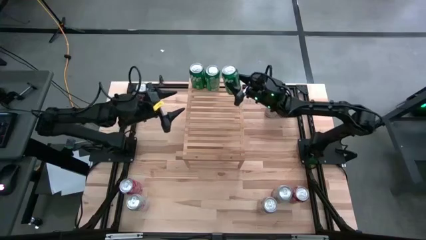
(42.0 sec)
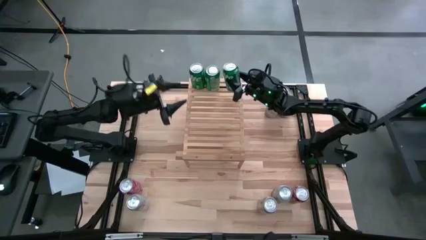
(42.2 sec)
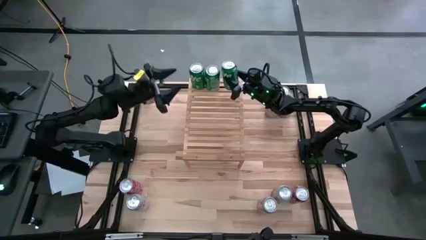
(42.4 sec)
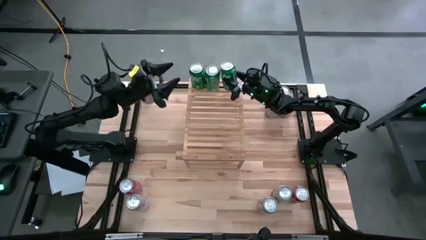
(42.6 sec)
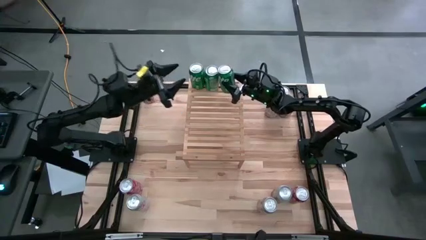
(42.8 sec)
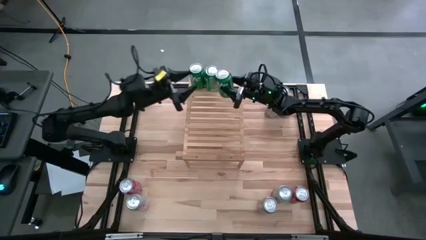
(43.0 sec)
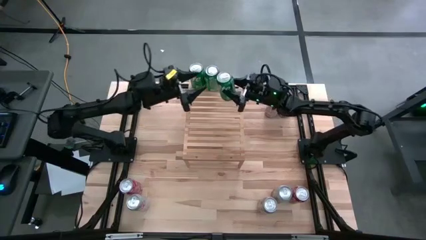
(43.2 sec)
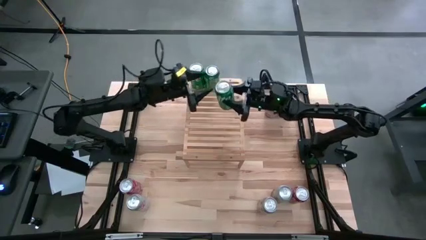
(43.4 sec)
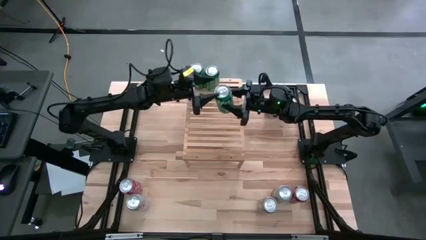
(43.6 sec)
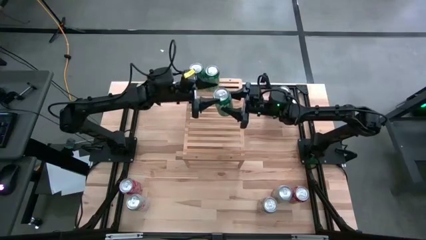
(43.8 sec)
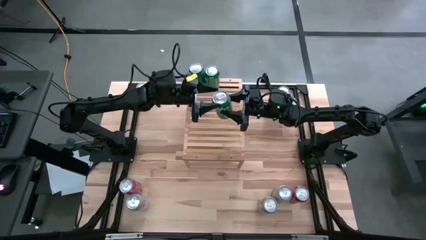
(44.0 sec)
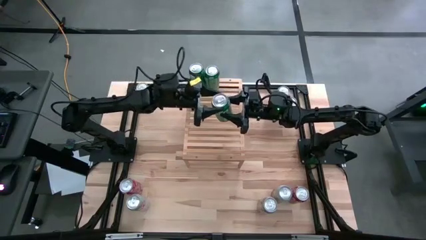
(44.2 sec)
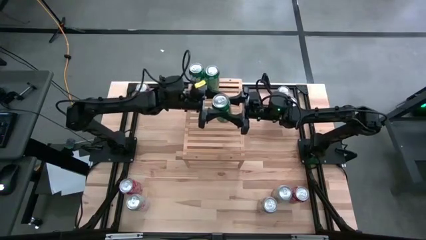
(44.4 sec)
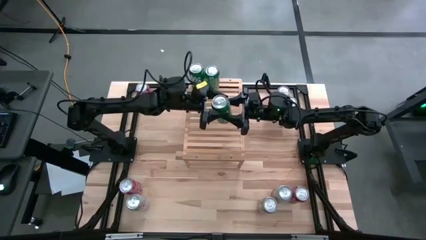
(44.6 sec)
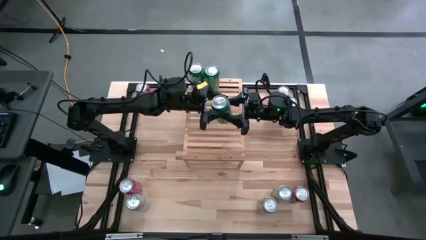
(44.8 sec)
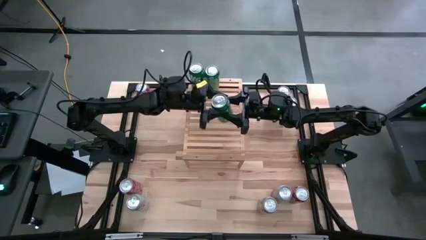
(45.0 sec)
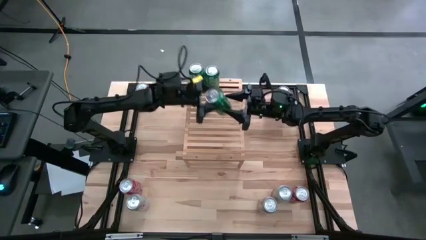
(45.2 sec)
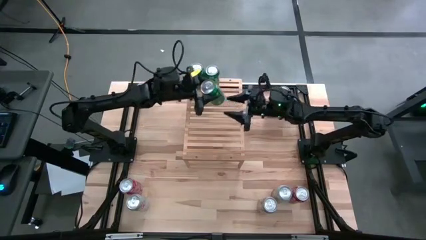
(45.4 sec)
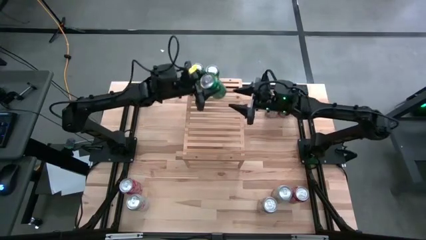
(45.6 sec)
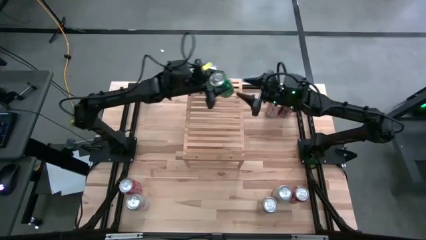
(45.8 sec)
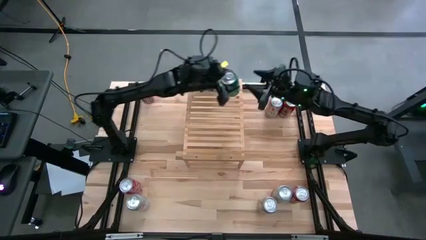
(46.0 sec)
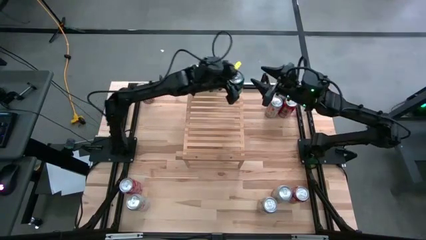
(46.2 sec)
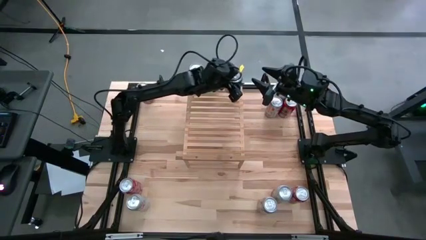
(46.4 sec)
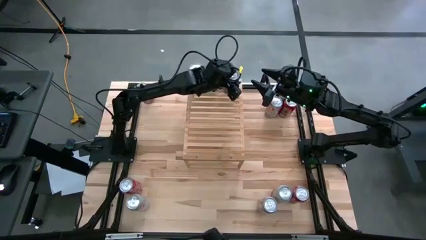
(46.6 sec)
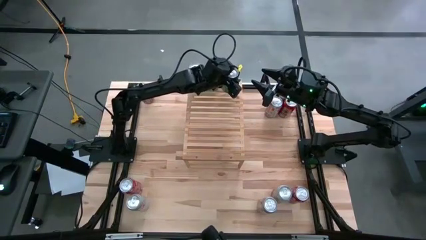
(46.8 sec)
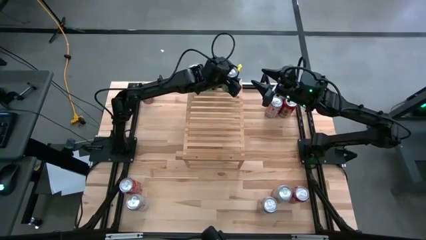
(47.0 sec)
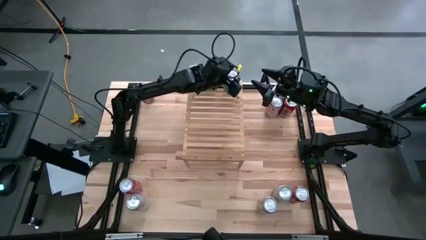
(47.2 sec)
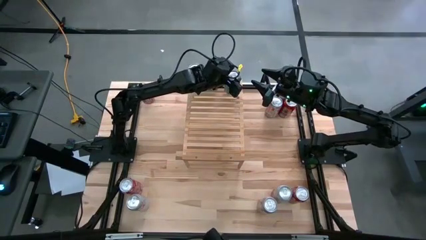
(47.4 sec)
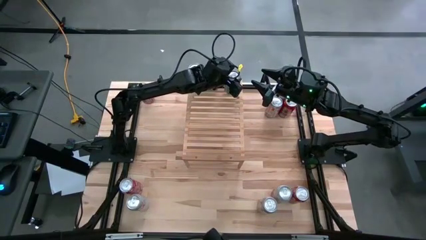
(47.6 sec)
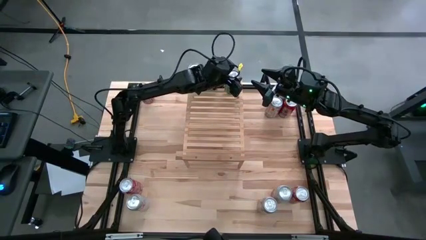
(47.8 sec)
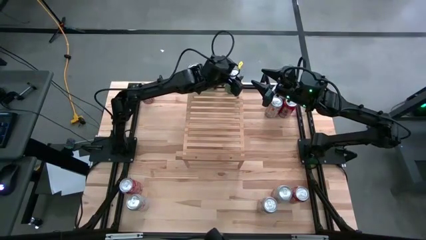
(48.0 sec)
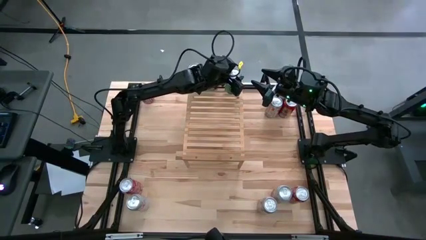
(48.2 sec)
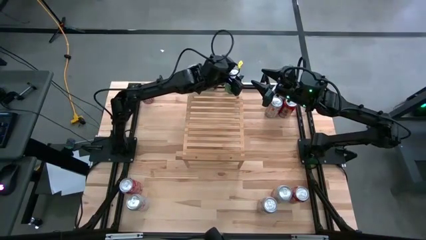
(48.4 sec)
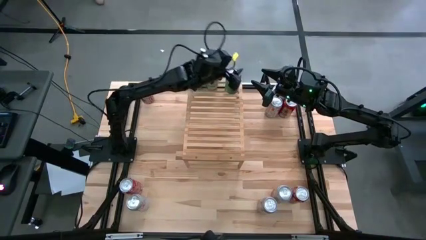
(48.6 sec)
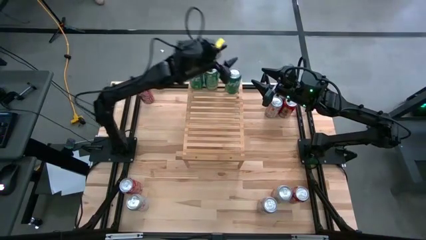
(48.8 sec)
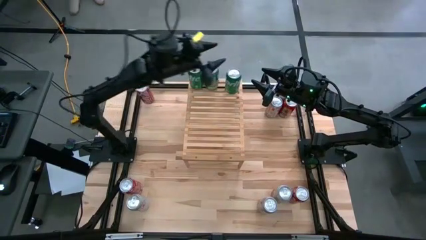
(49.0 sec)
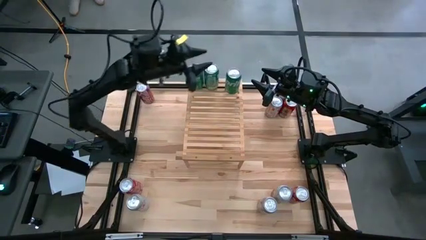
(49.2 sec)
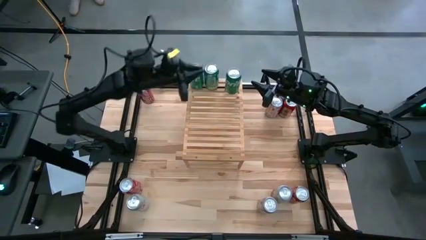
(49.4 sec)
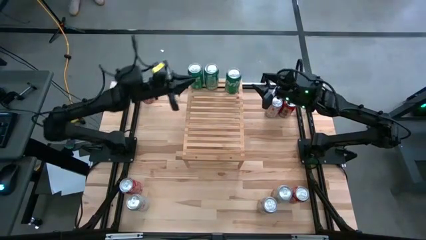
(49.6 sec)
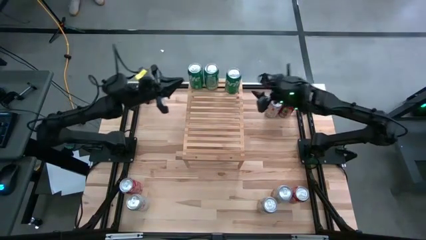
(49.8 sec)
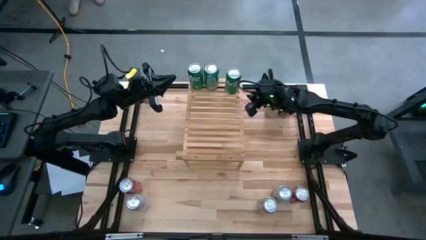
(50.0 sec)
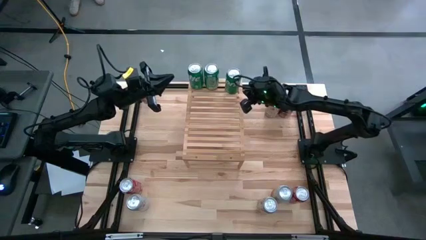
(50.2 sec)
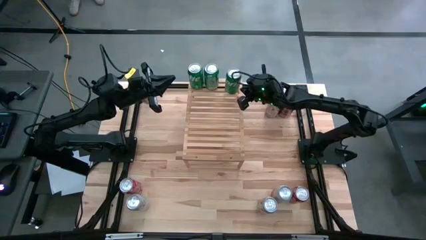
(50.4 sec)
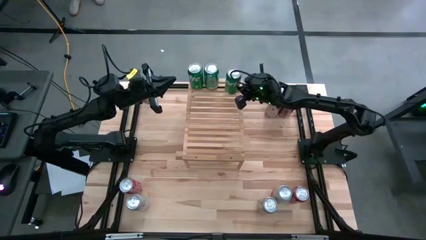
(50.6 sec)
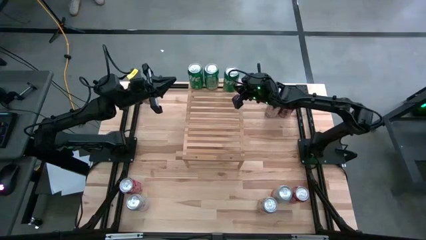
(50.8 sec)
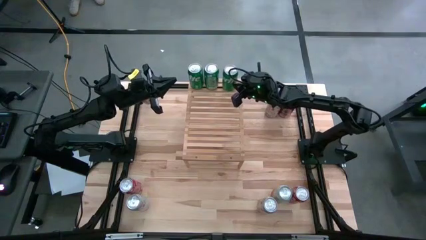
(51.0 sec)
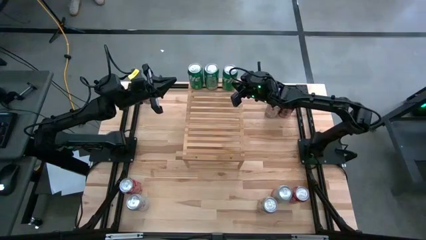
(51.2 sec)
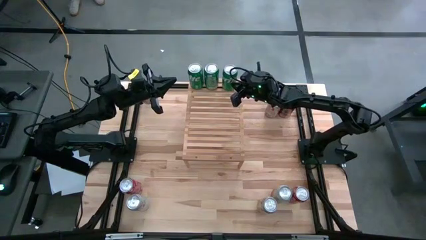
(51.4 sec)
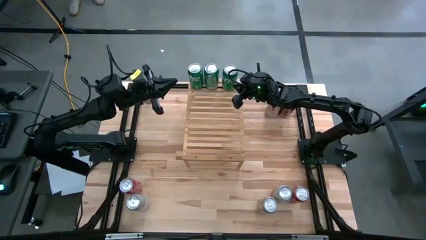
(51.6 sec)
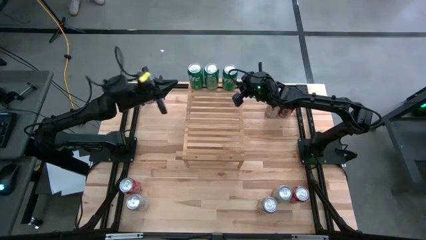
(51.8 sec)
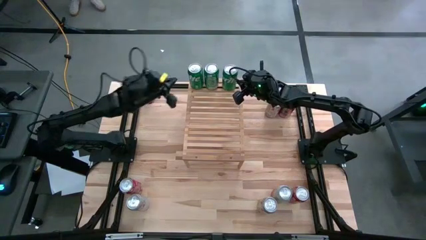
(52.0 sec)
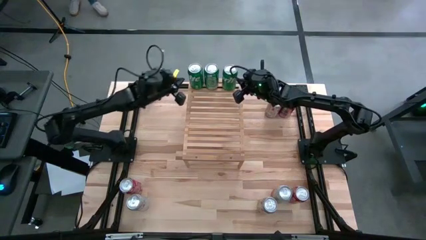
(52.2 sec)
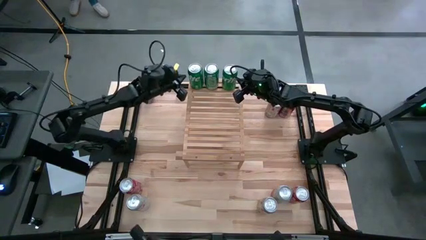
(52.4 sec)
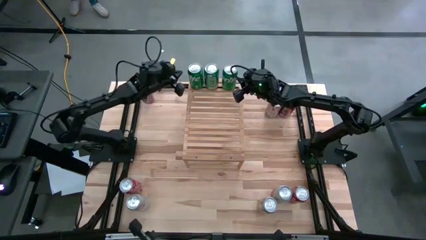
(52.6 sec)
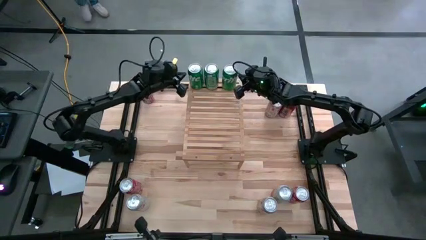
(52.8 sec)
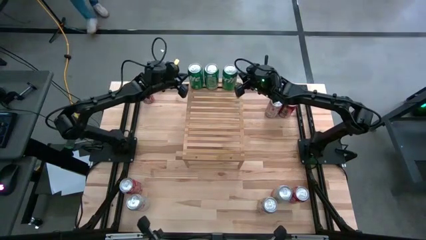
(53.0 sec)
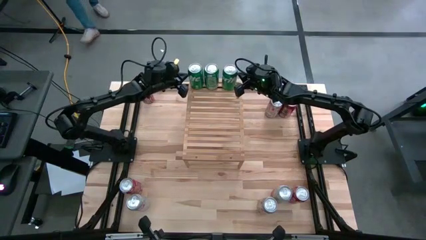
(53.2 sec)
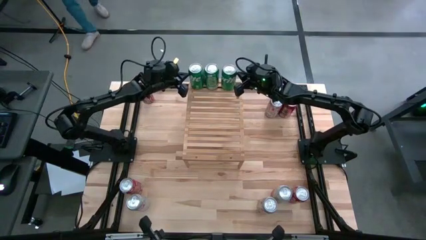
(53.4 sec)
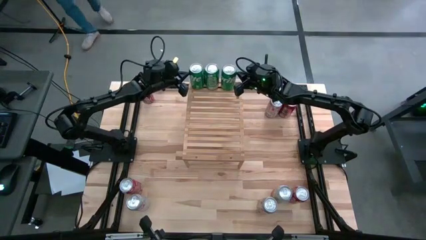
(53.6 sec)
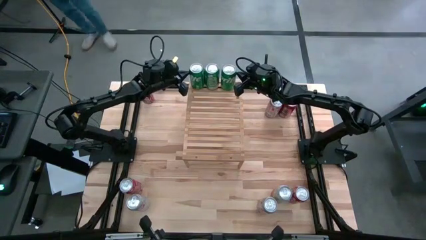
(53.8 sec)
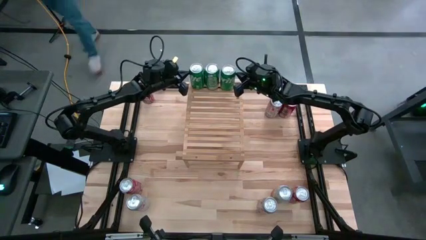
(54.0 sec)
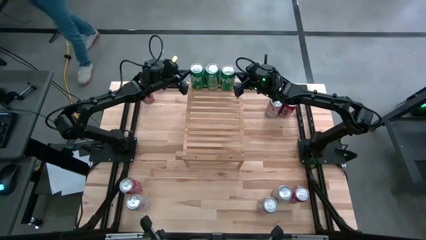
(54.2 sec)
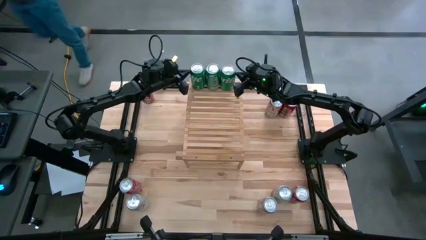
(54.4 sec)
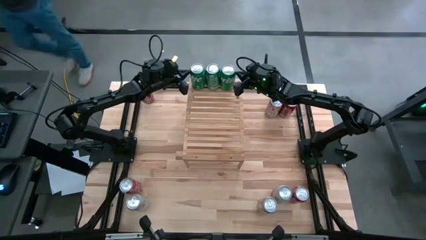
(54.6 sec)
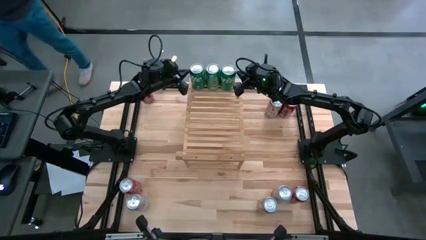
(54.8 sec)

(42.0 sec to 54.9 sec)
Task: Place canned beverage on shelf
Put the green soda can on the shelf aligned with the other green soda cans

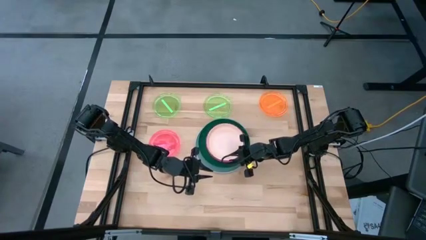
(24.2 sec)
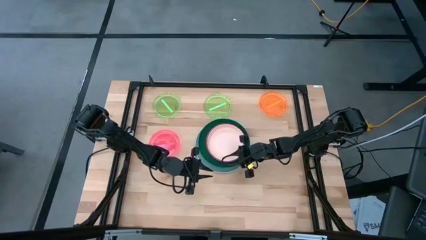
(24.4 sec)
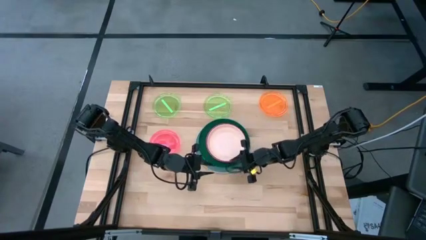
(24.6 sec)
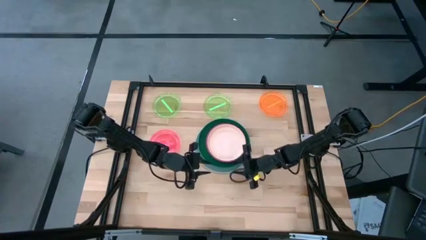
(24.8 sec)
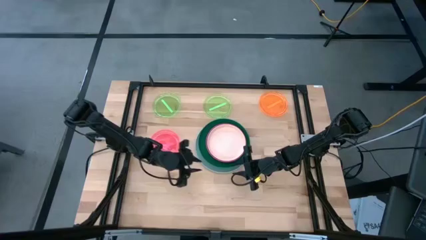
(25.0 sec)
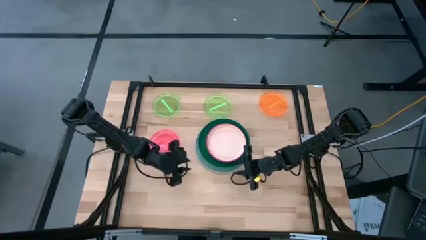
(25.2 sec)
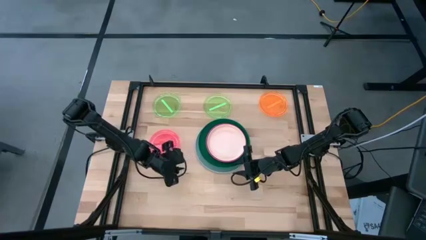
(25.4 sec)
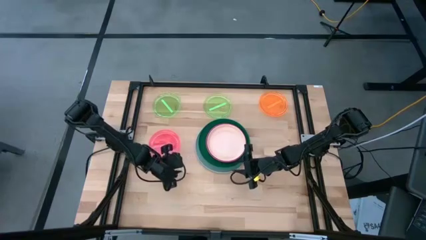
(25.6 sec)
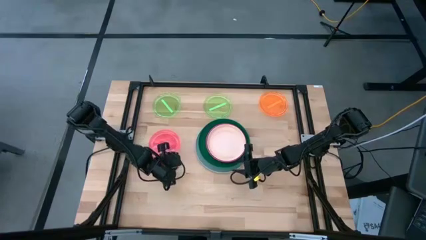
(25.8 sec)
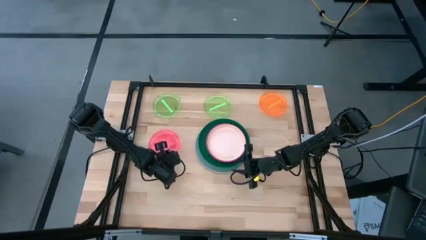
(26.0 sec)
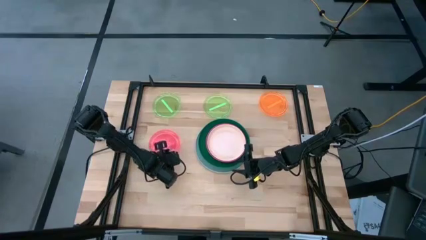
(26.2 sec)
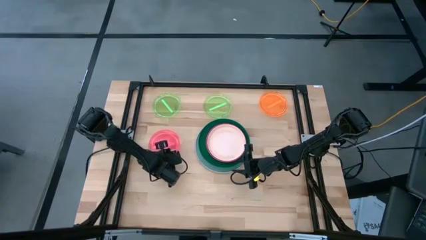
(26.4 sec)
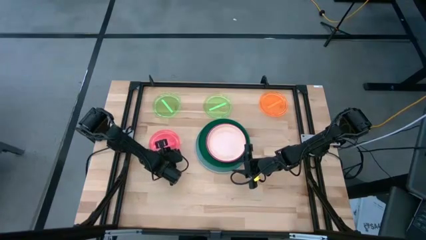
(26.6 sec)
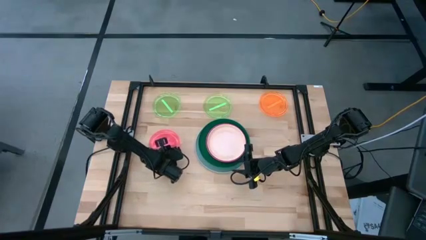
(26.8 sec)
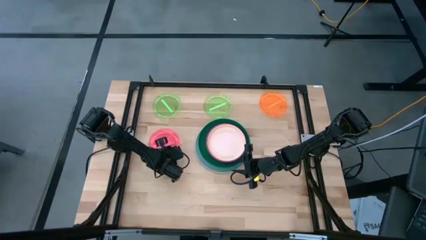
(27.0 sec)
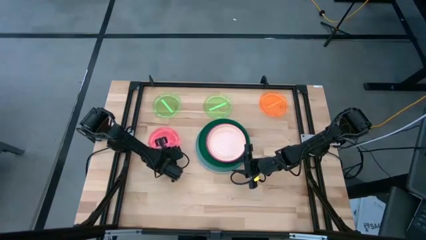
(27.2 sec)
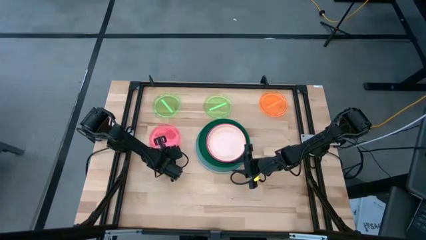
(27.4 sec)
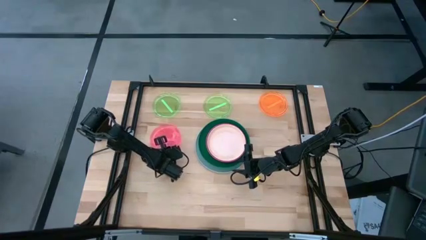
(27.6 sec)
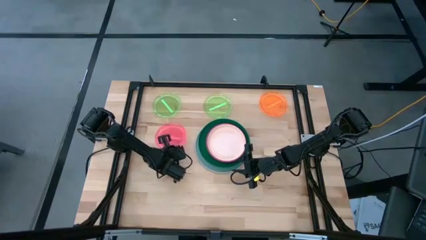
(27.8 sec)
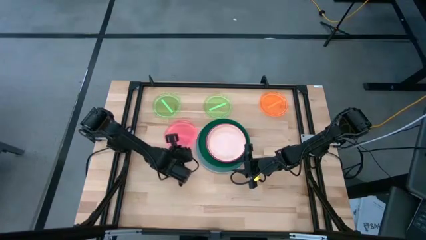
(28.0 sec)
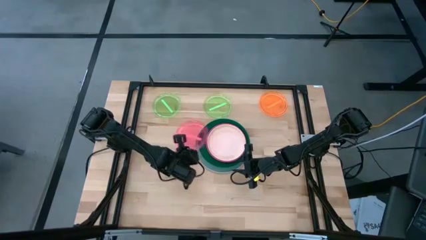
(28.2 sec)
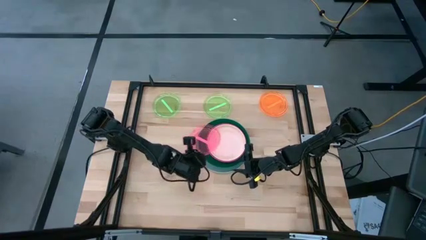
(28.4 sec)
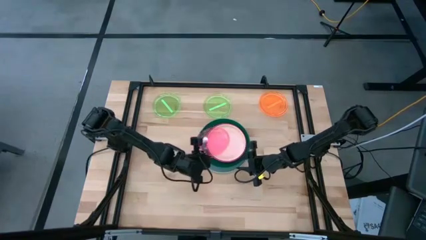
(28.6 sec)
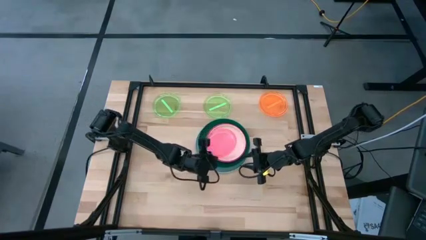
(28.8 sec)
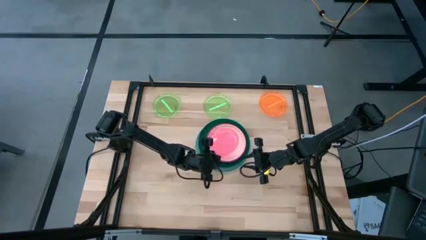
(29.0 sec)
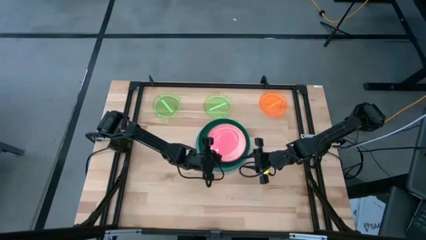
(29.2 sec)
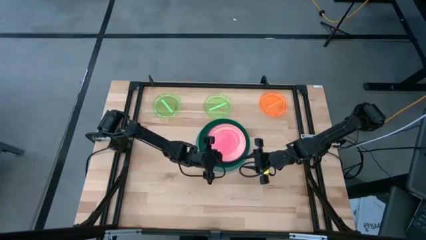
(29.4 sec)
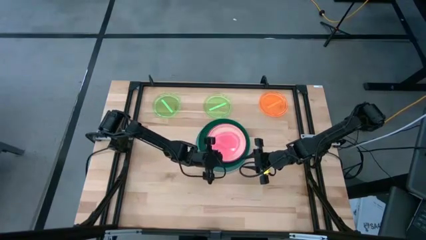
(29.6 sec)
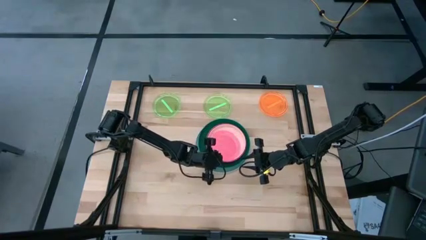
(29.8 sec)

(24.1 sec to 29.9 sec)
Task: Stack plastic plates
Stack the light pink plate on top of white plate
